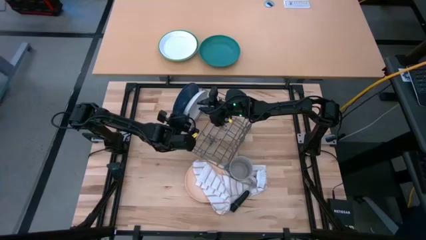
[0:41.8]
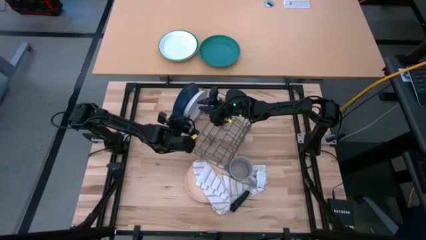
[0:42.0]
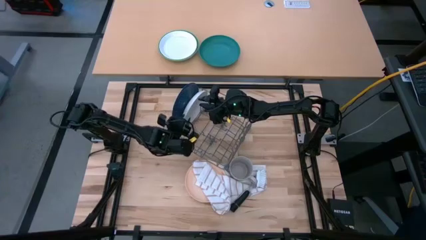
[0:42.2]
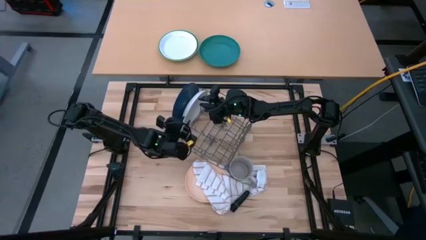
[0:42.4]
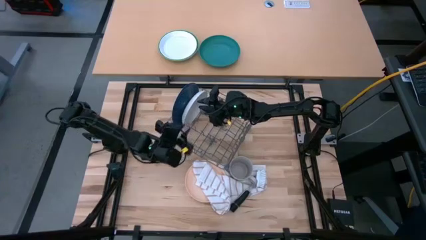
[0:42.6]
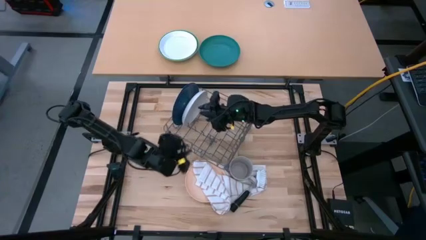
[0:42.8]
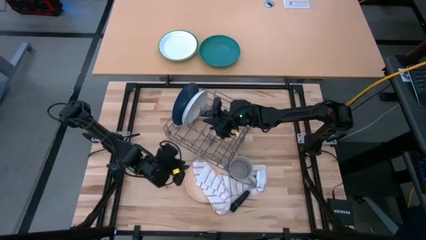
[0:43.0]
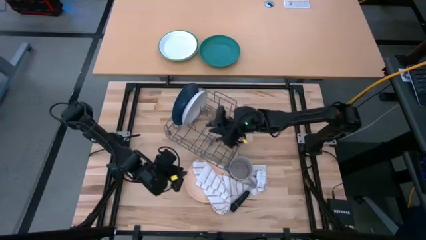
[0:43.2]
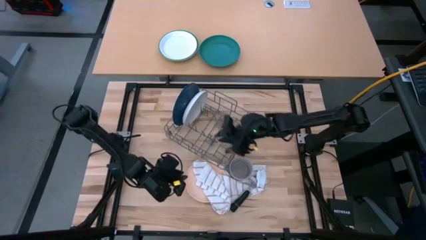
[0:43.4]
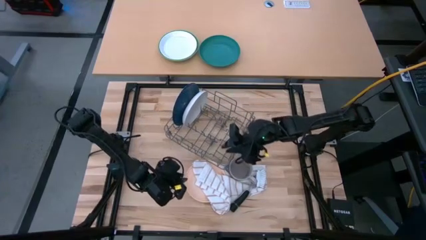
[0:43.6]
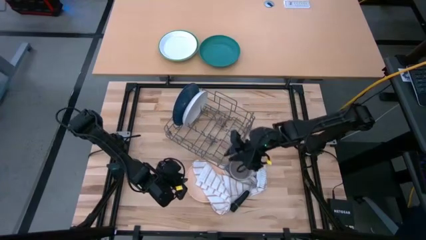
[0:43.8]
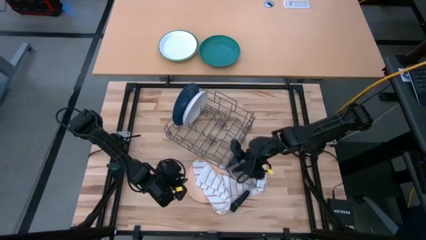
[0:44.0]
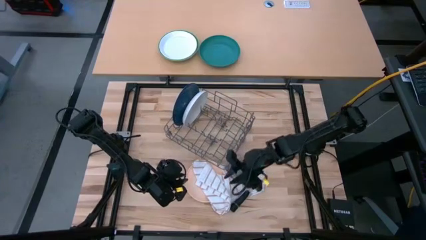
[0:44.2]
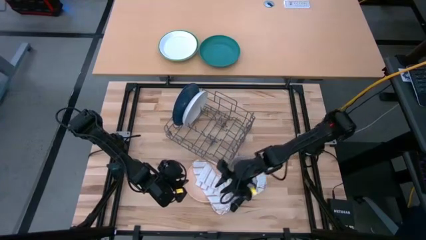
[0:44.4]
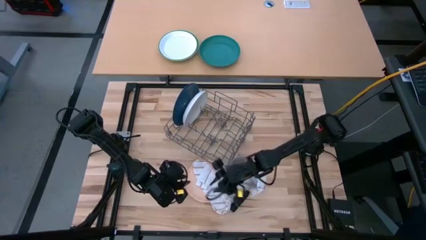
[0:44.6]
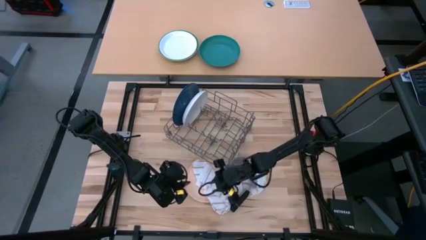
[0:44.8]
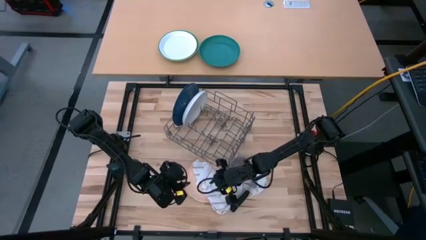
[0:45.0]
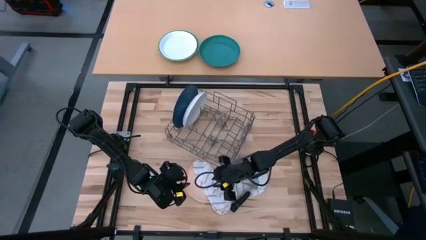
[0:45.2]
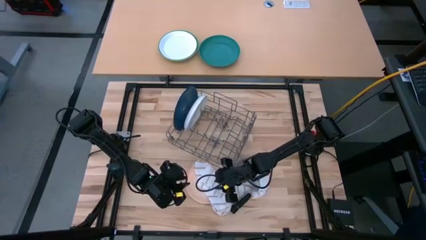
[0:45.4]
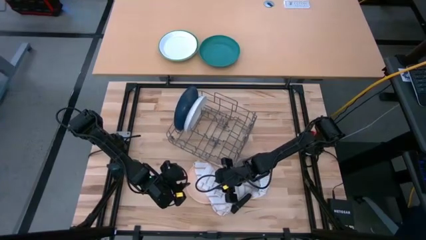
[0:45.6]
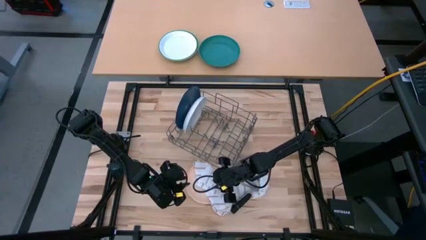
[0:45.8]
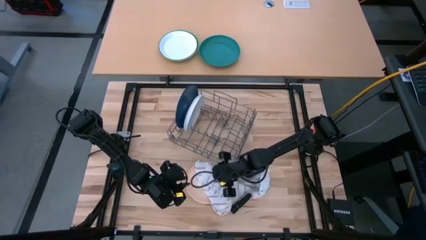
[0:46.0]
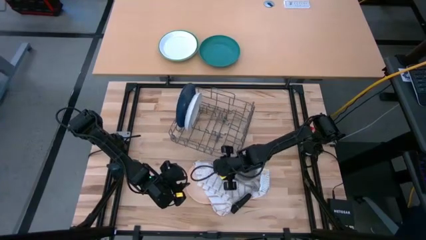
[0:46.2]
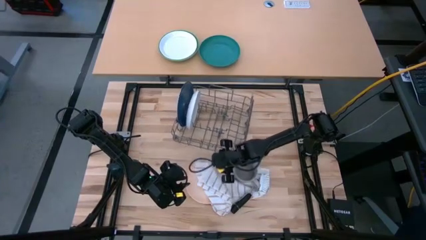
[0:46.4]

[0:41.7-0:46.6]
Task: Sort dishes
Adjust the dish rack

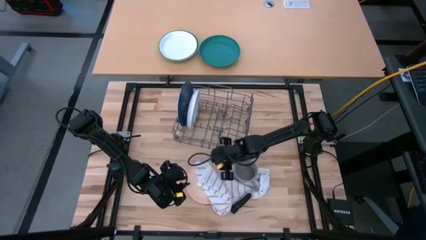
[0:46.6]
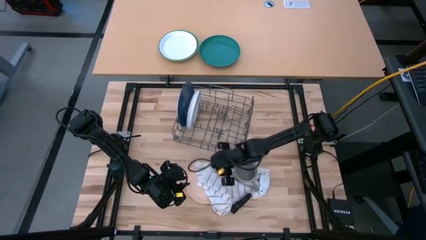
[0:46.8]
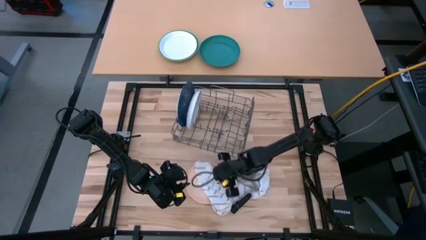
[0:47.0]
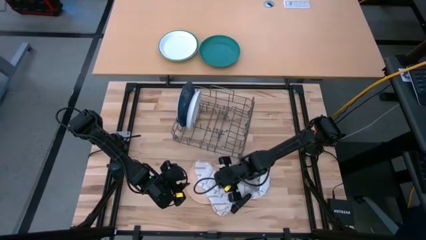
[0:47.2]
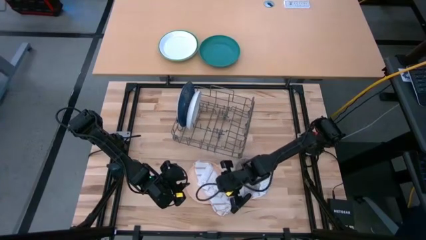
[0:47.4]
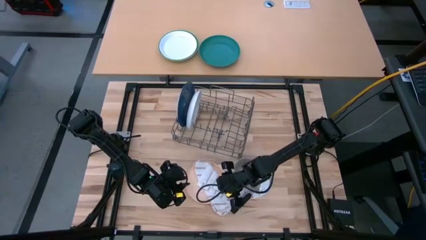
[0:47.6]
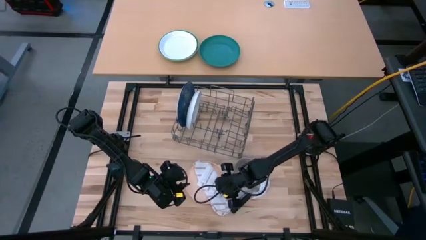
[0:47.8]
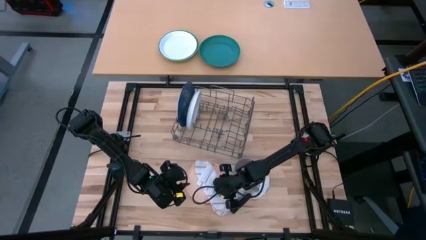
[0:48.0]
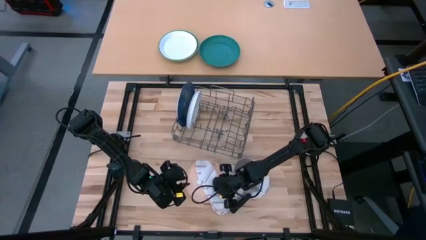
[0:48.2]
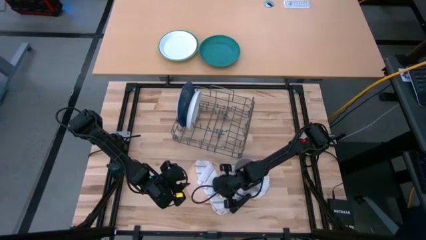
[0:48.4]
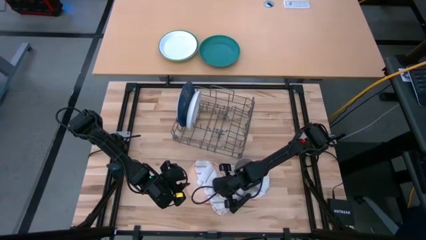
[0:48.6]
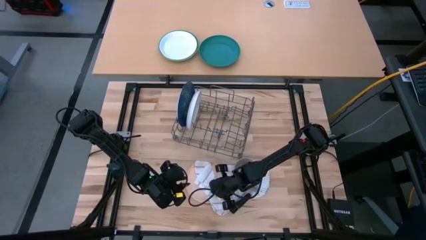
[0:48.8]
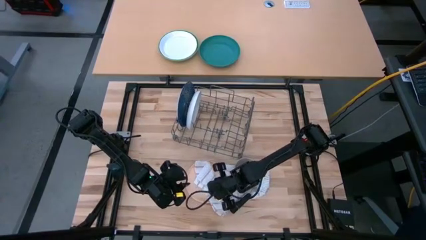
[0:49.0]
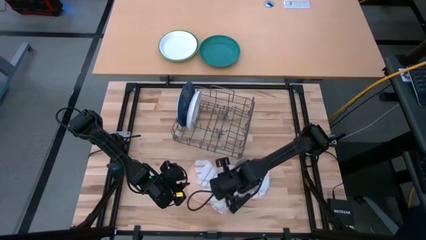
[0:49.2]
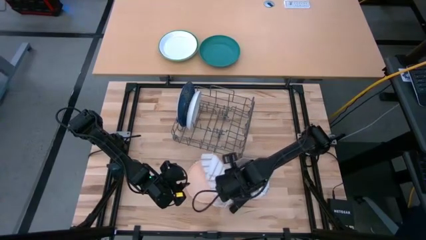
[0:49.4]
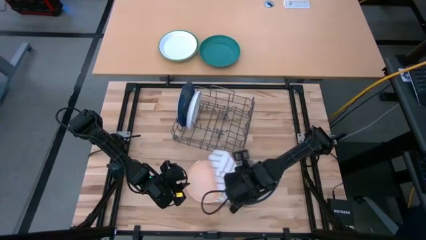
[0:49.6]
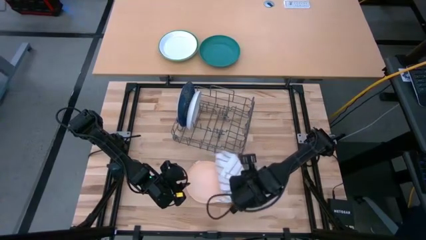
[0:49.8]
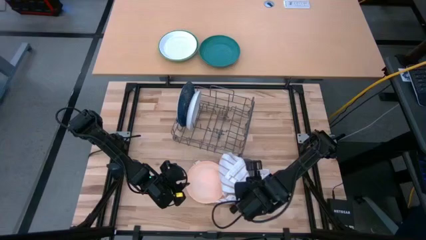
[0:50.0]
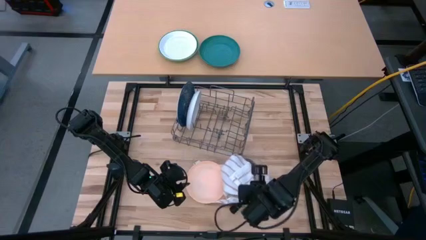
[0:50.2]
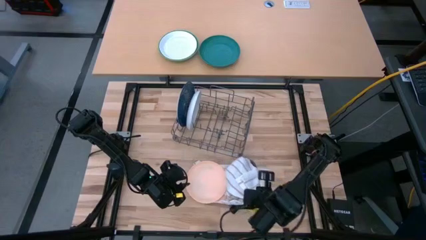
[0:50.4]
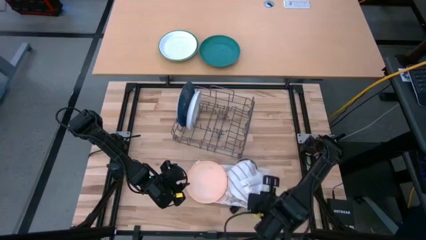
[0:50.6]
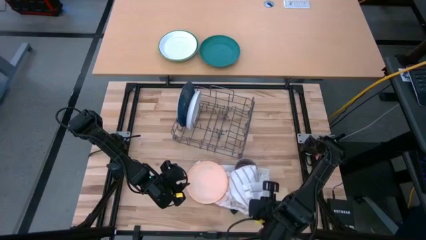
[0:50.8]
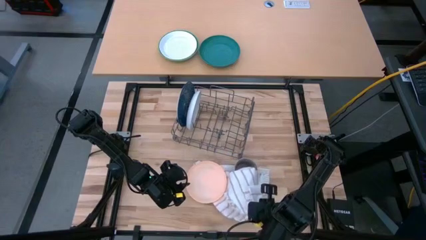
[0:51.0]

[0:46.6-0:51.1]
Adjust the white patterned towel

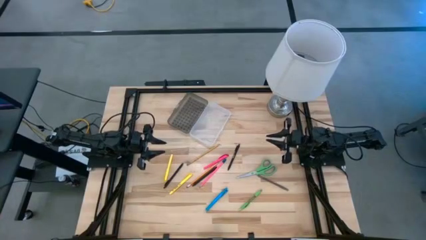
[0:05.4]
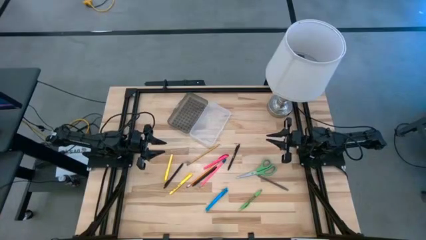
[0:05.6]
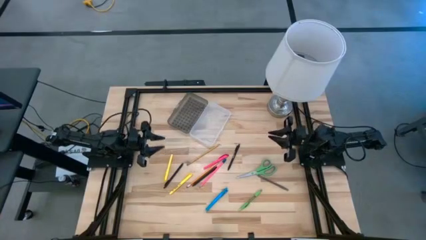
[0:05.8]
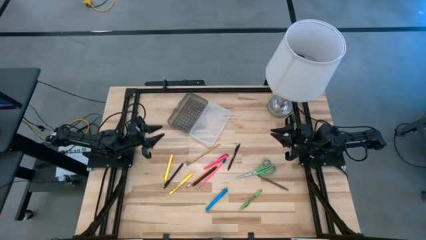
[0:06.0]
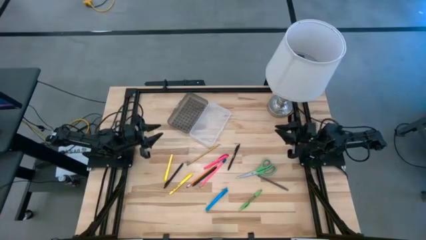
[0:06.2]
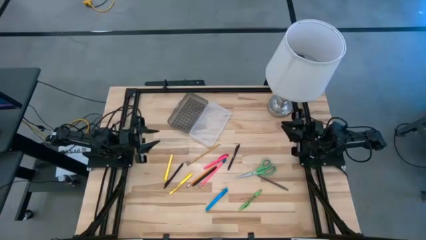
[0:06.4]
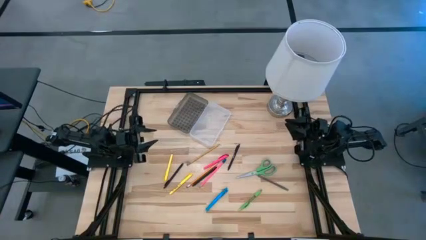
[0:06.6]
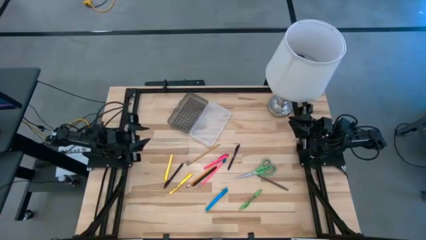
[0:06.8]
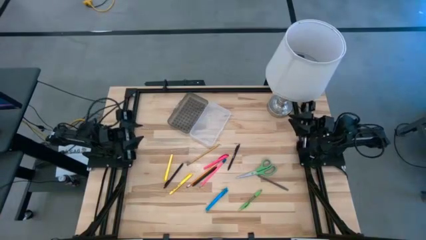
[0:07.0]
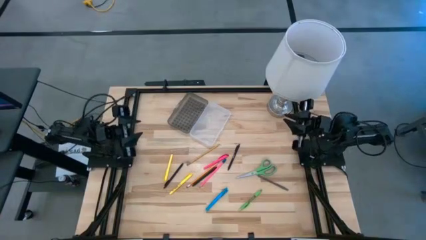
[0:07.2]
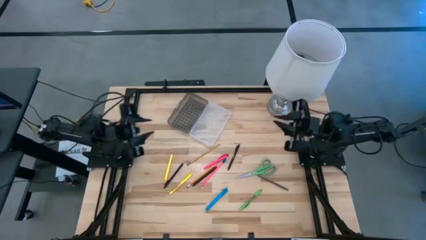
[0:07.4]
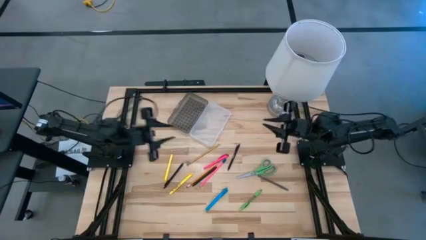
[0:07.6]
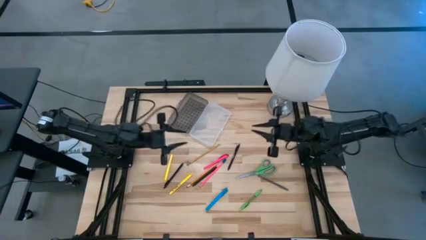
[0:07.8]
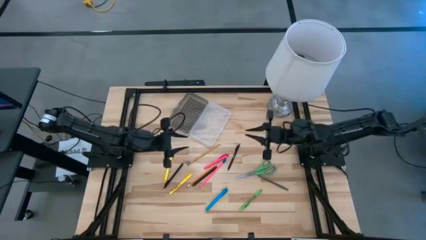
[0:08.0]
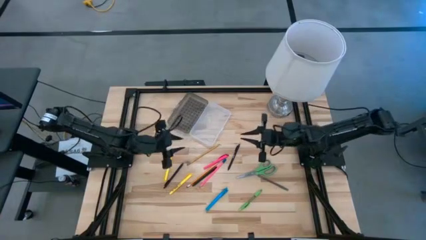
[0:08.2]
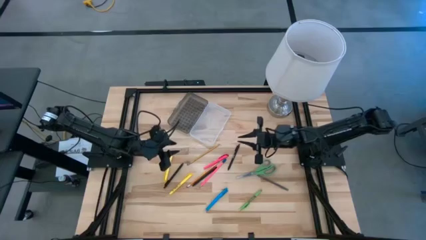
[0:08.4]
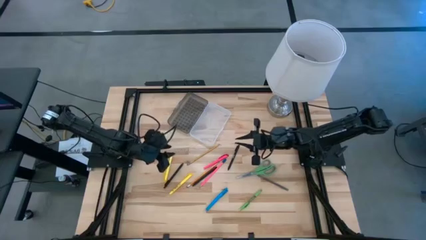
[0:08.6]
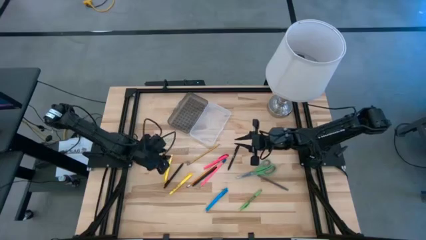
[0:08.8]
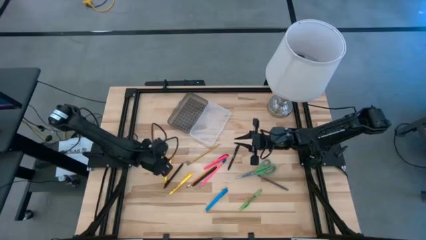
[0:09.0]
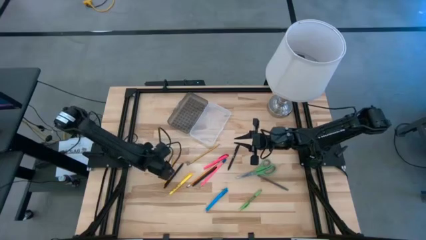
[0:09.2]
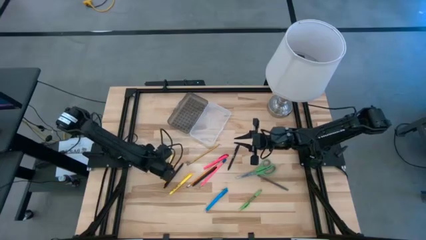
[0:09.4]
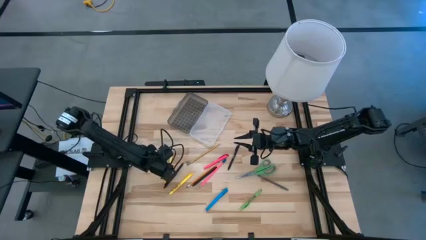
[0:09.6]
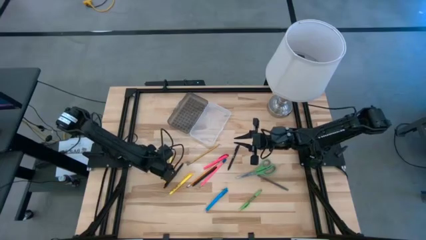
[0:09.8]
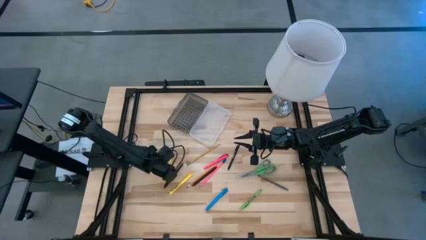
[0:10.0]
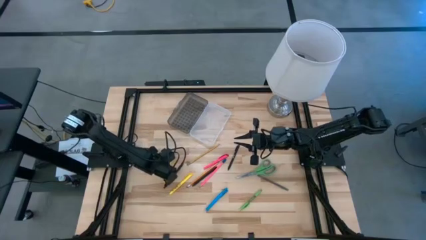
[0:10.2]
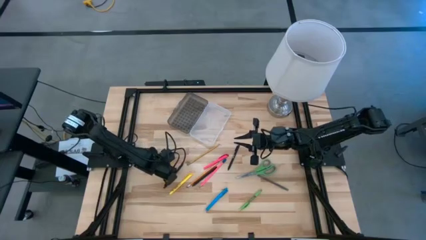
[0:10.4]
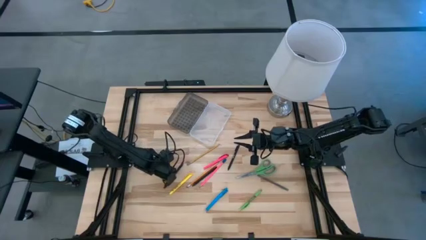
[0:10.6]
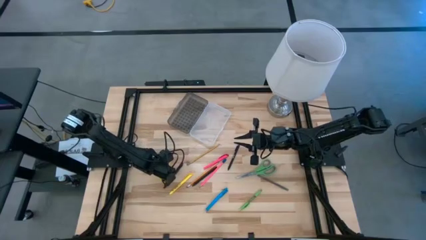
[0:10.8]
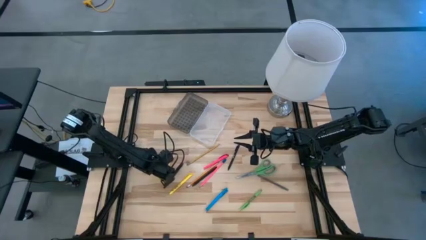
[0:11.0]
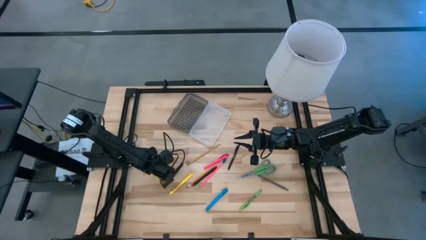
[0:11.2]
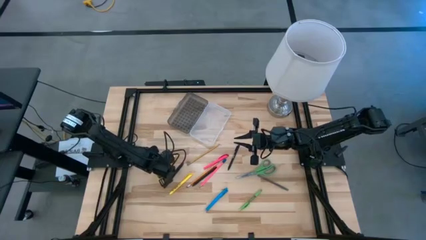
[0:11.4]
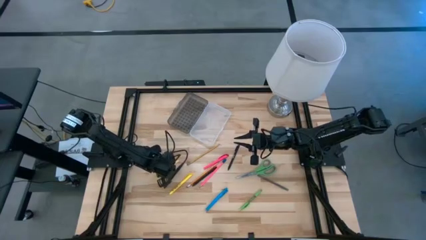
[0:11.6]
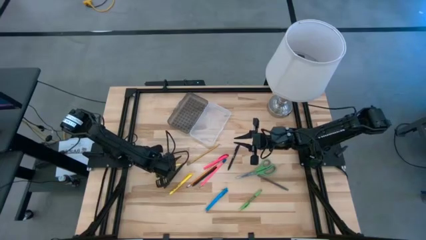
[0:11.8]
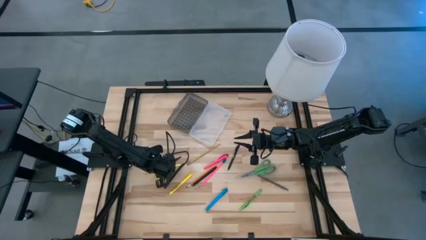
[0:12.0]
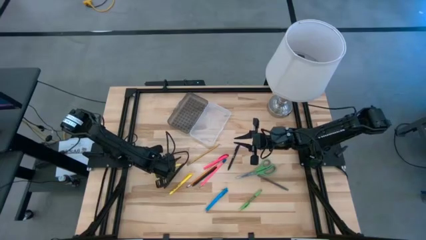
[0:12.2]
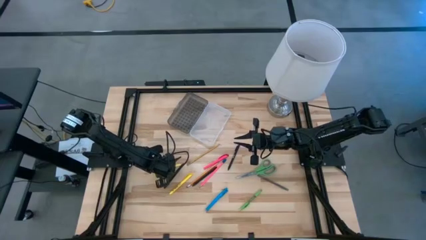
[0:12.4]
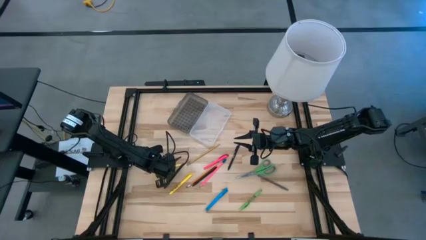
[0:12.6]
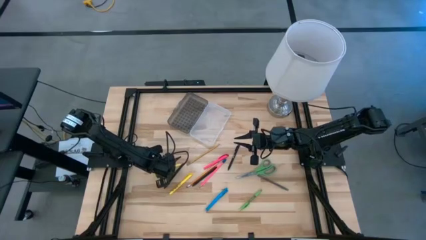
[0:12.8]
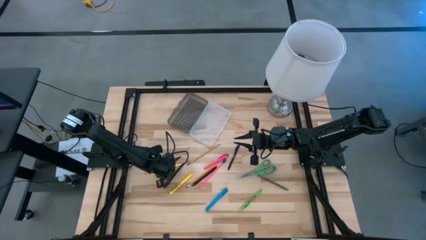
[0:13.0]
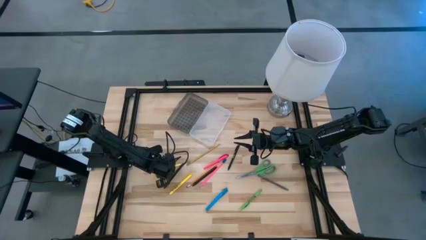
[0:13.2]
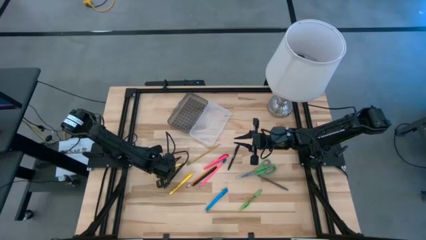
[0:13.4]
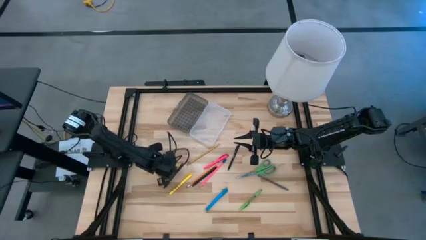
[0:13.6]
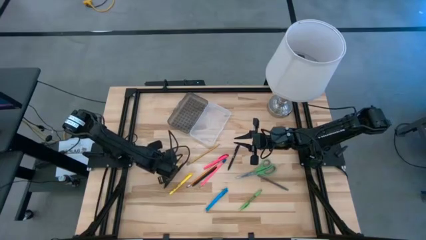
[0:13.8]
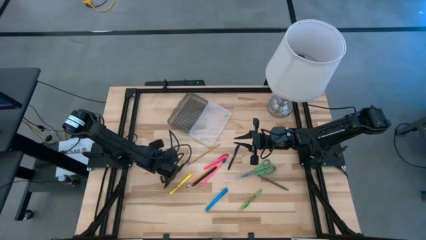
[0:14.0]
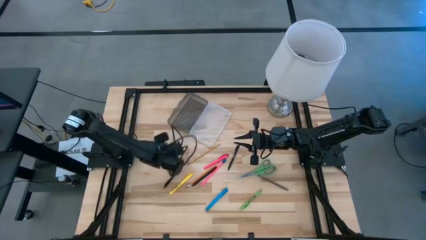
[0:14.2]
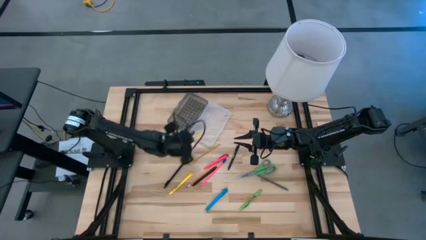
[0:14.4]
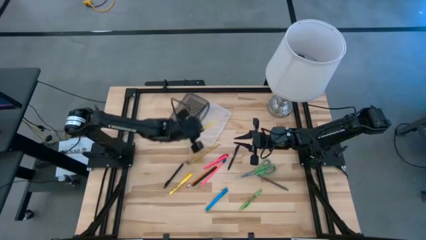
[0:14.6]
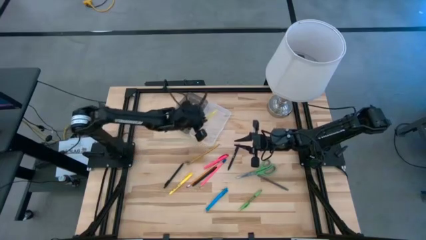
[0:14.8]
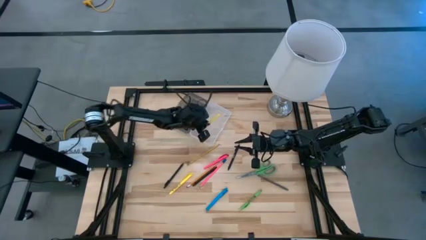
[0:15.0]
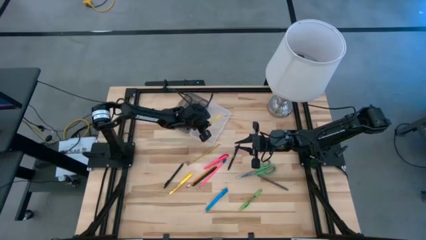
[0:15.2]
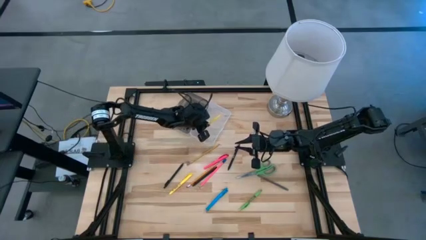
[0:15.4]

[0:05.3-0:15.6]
Task: Pick & place school supplies into a supply box
Put the yellow pen into the supply box
